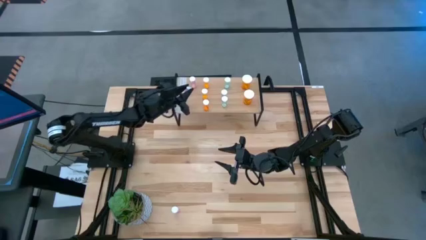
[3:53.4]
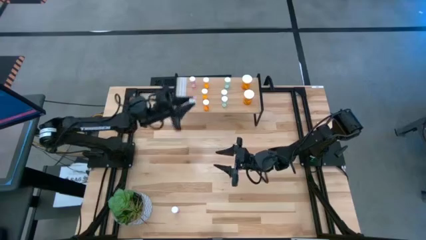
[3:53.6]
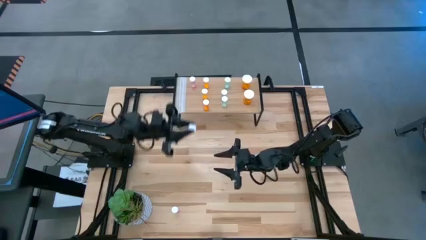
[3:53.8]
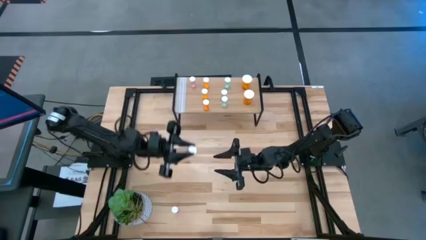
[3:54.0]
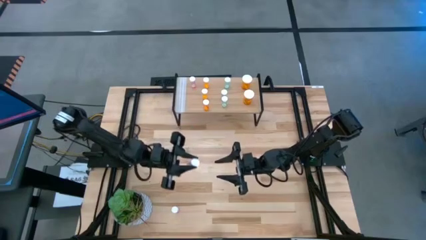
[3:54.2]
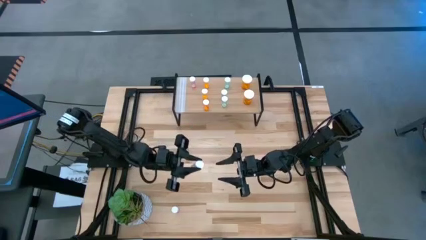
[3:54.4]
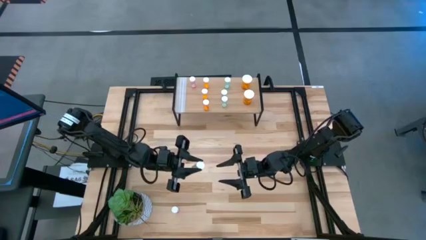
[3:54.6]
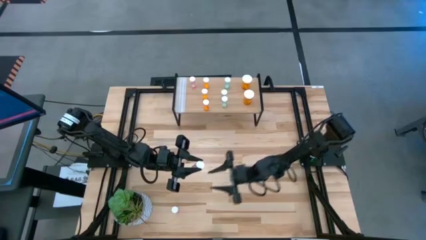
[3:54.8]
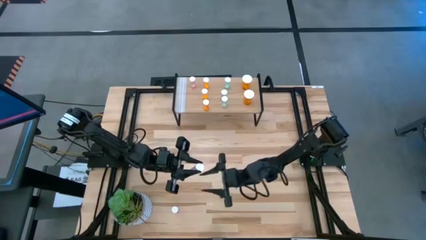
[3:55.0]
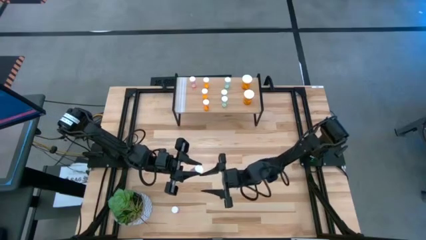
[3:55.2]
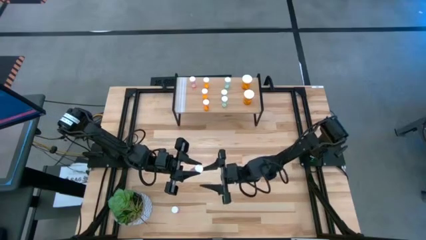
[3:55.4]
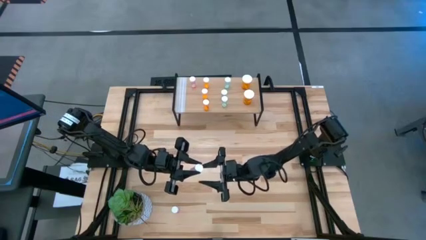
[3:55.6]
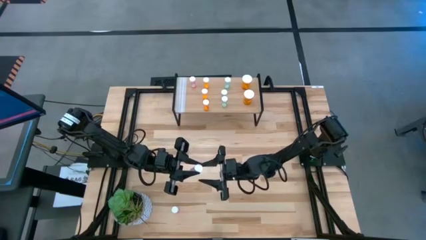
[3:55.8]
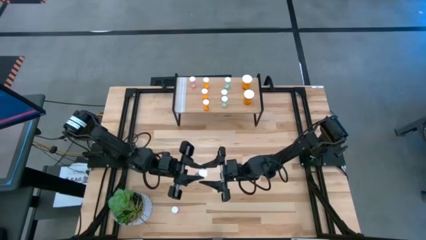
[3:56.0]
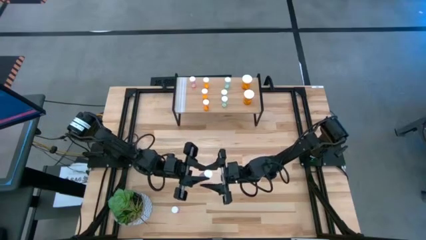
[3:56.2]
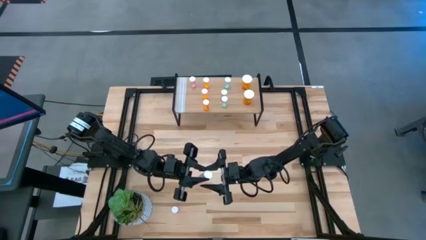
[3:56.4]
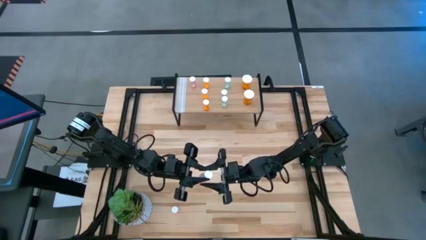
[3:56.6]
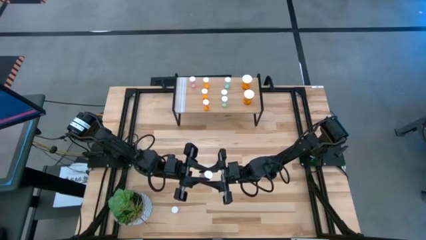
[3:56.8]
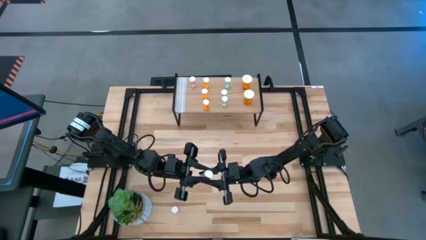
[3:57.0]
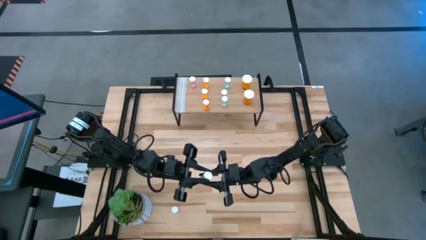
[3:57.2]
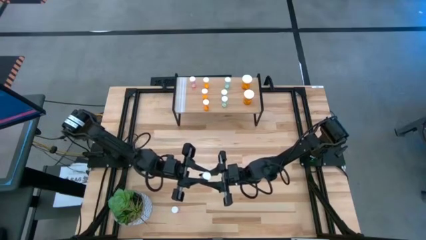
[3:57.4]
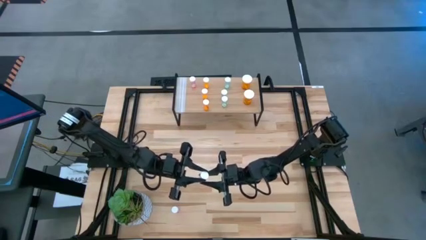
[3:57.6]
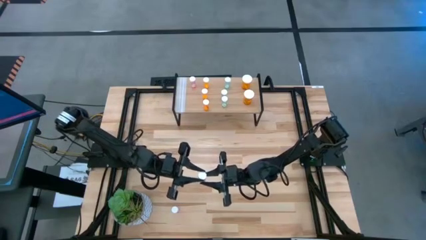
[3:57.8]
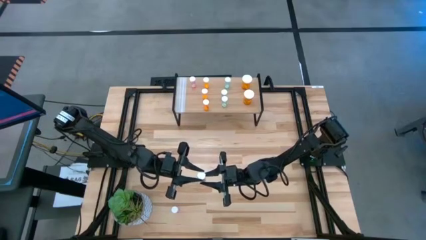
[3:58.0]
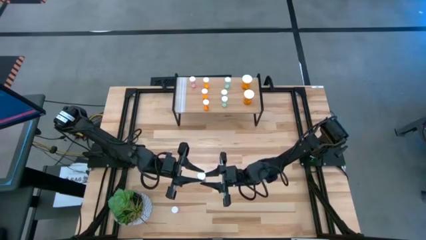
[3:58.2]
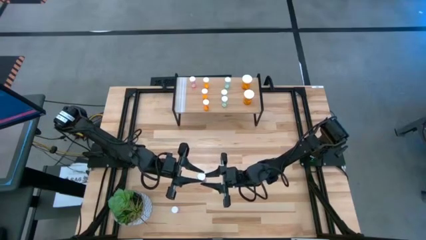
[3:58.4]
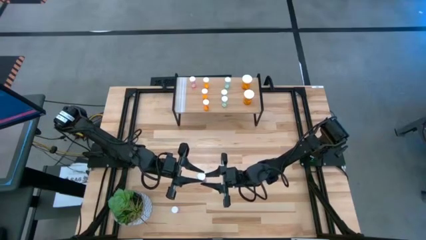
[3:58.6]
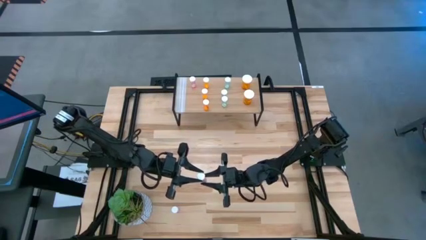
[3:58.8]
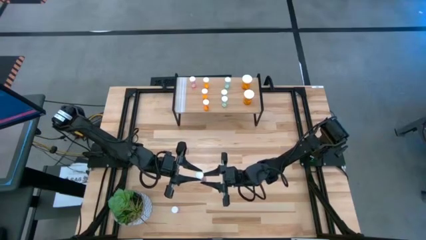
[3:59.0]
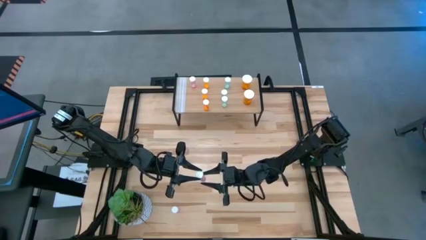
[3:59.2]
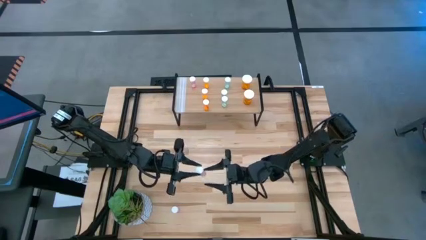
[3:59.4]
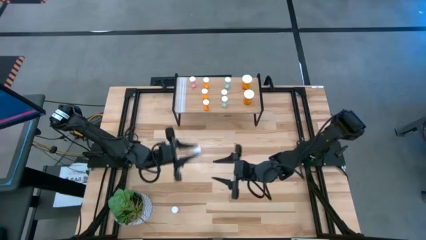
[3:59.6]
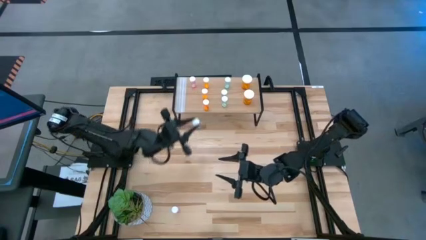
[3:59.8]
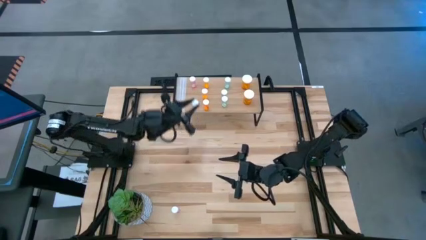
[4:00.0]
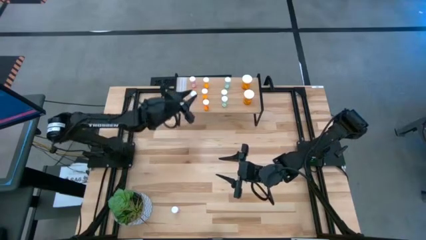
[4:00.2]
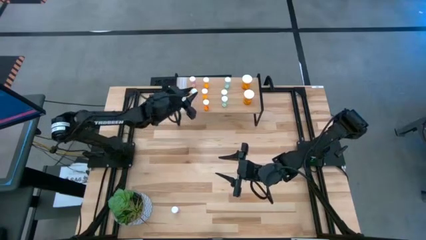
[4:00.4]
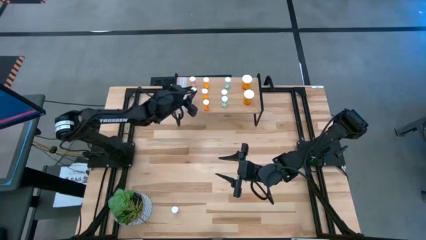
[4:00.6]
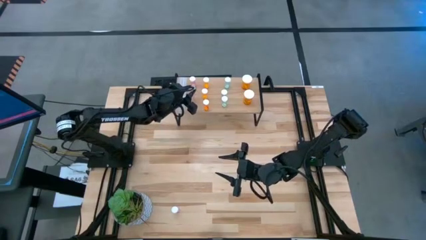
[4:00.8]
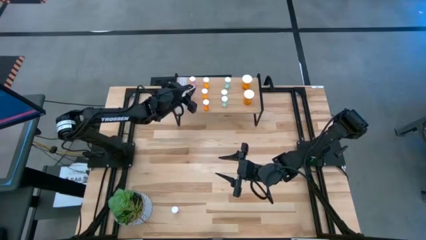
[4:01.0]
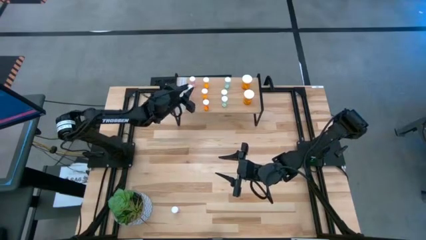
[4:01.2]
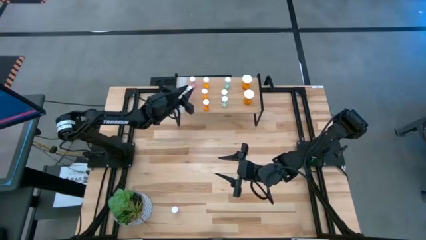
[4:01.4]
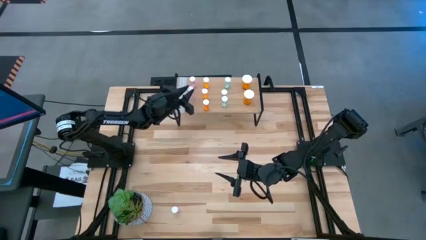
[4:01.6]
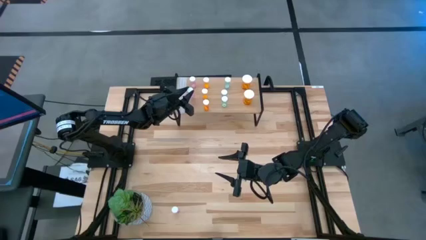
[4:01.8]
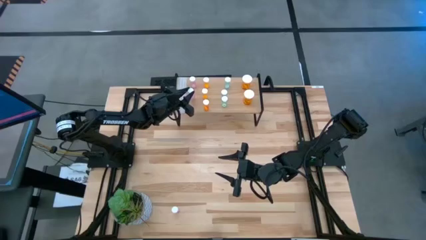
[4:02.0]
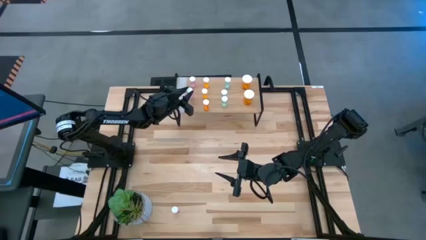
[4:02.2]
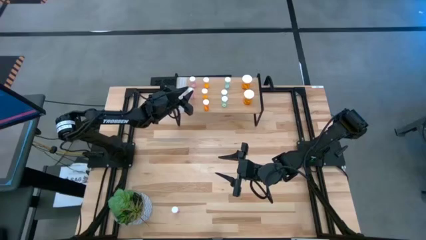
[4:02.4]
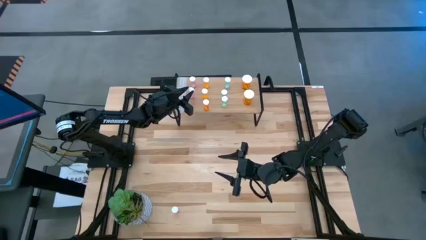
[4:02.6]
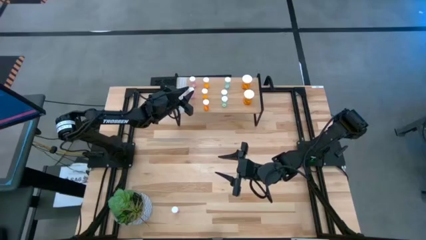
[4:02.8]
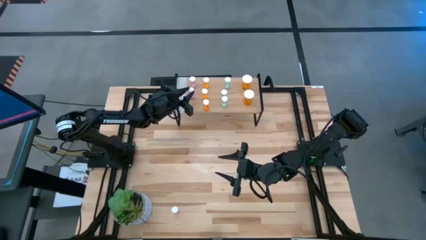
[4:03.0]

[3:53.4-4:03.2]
Task: Pick and place medicine bottles onto shelf by color
Put the top small pink pill bottle on the shelf aligned with the other small pink pill bottle

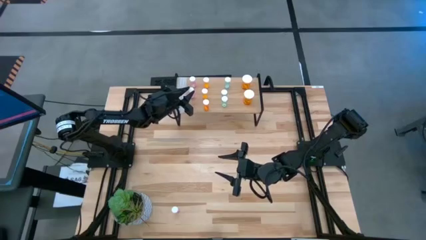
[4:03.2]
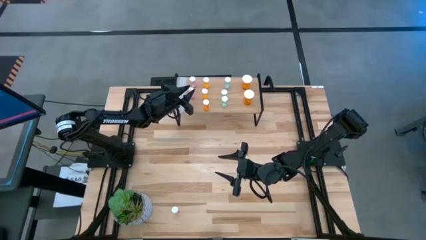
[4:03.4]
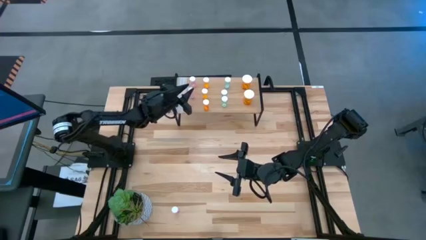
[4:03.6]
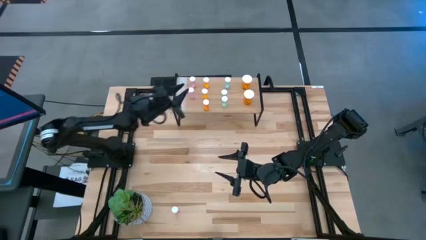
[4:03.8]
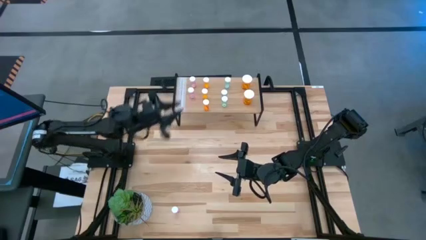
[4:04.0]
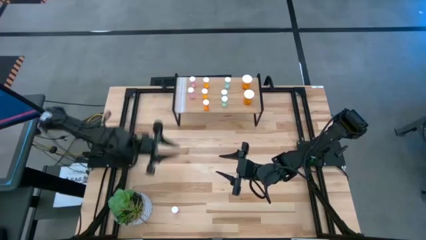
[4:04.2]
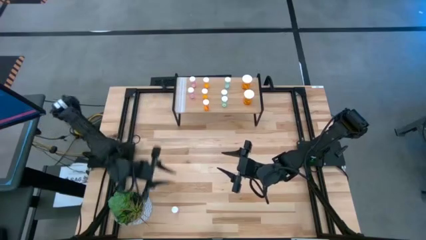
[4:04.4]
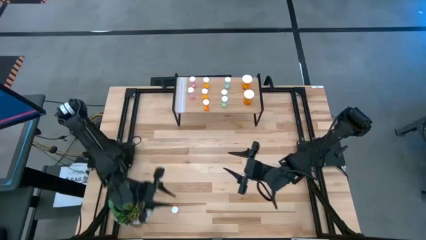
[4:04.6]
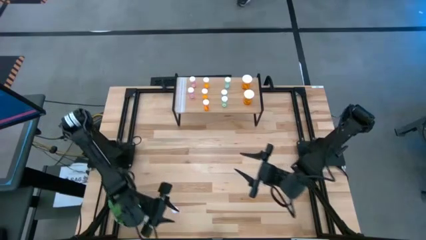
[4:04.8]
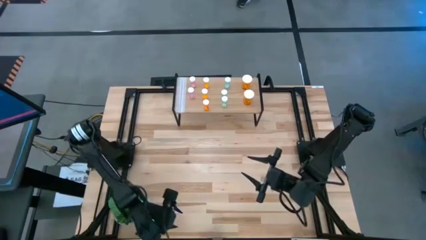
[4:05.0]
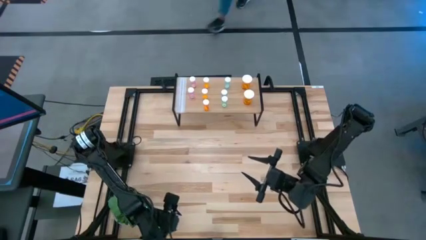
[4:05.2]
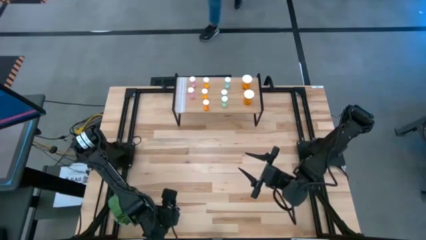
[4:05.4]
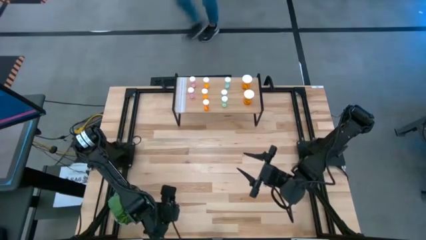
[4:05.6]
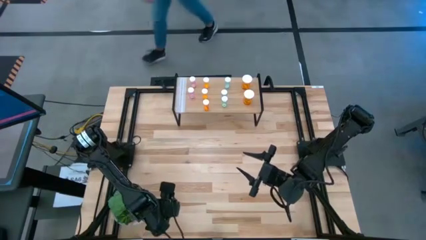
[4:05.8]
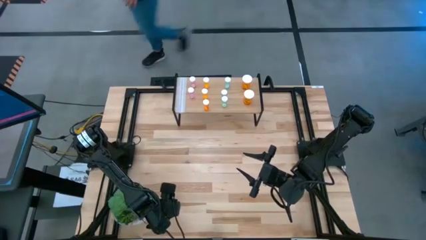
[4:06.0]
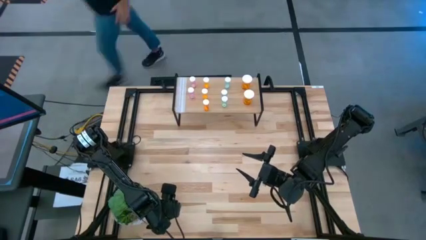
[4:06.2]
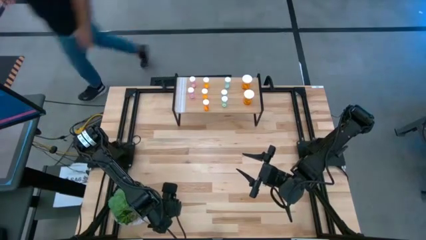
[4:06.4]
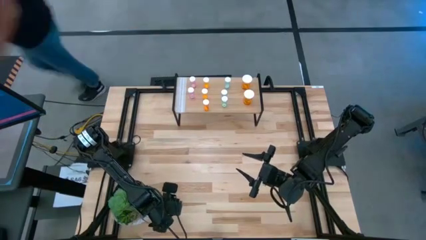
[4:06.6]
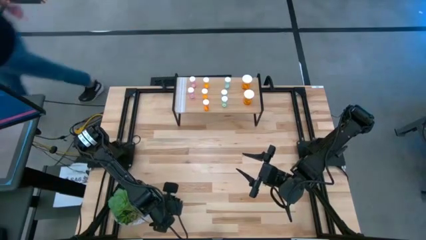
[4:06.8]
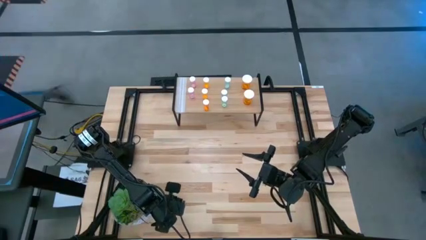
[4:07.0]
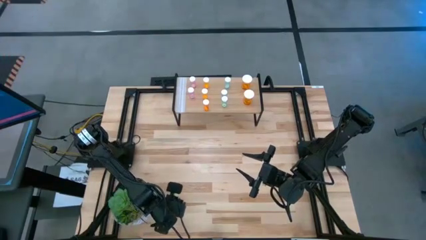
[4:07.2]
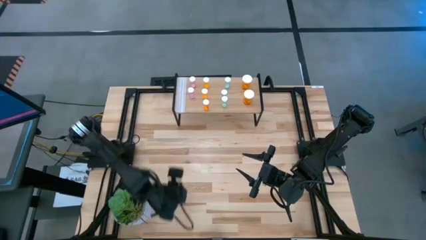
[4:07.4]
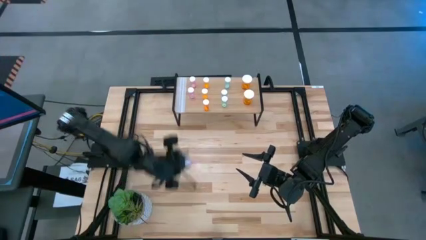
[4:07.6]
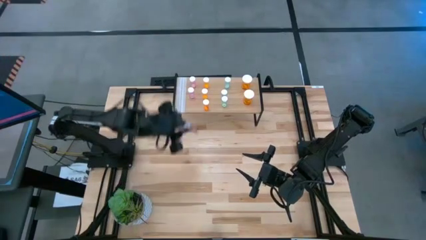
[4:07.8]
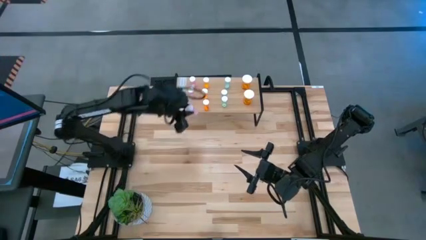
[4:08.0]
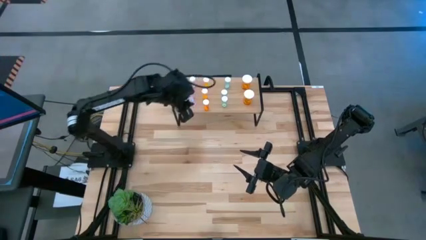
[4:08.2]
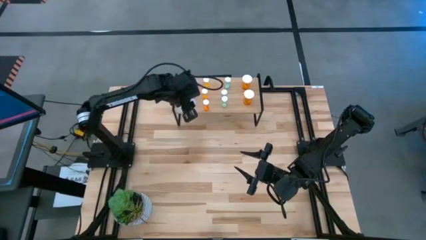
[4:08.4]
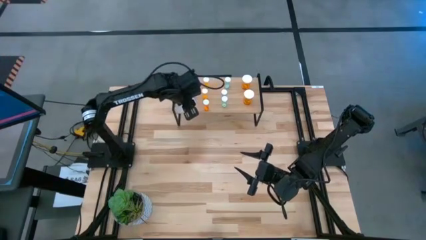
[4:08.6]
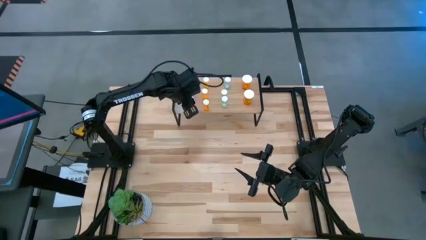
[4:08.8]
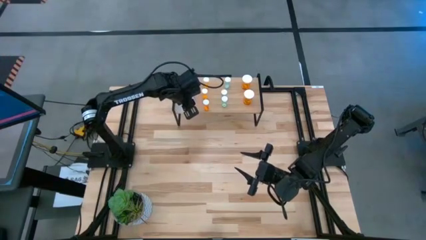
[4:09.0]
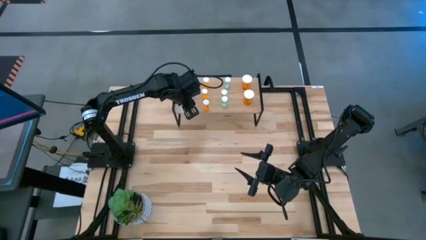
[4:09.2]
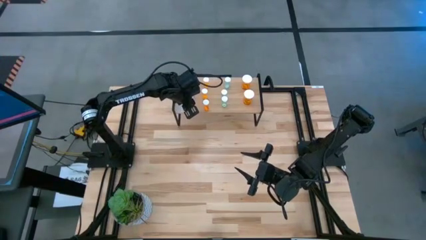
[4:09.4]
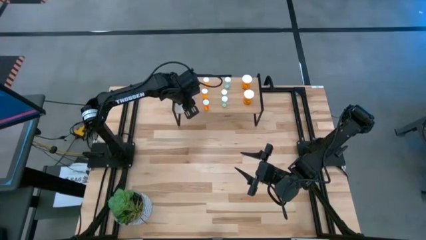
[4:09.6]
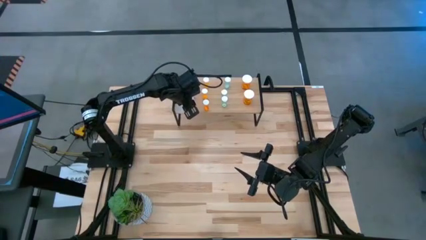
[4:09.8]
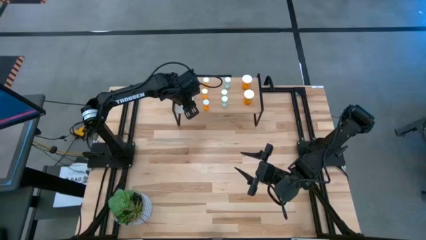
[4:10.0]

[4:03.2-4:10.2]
Put the small pink pill bottle on the shelf aligned with the other small pink pill bottles
